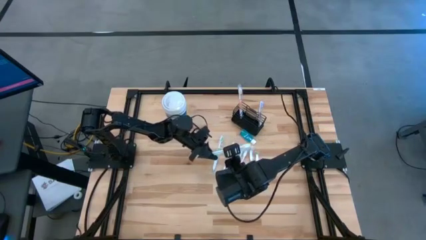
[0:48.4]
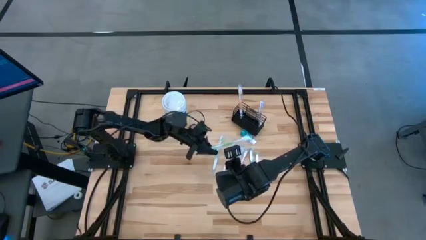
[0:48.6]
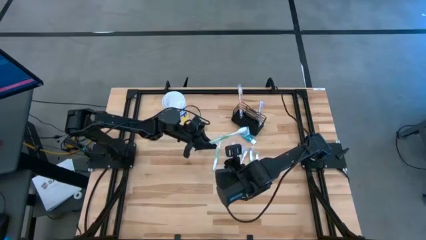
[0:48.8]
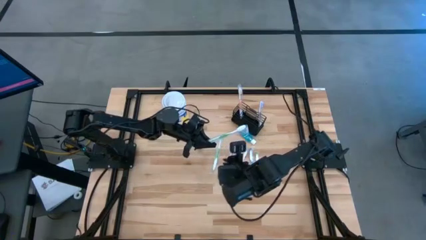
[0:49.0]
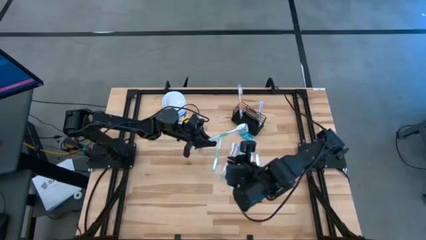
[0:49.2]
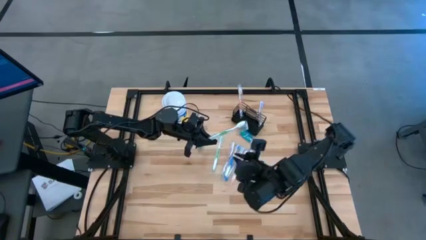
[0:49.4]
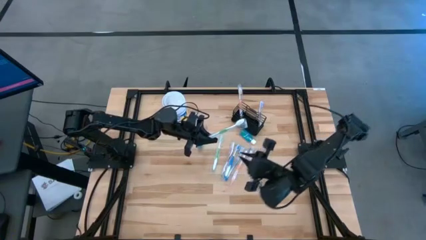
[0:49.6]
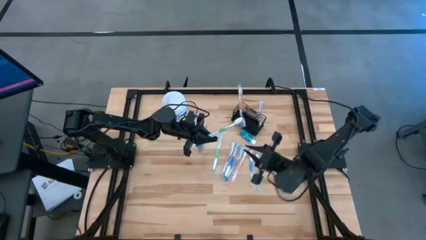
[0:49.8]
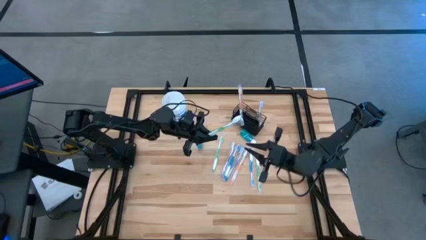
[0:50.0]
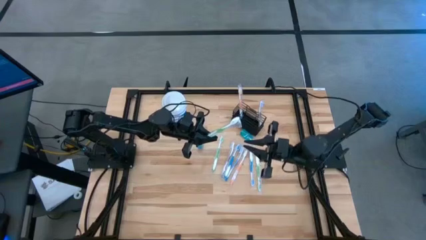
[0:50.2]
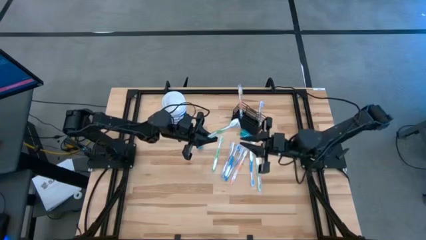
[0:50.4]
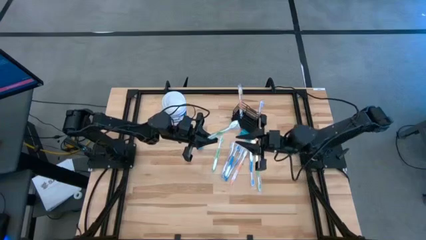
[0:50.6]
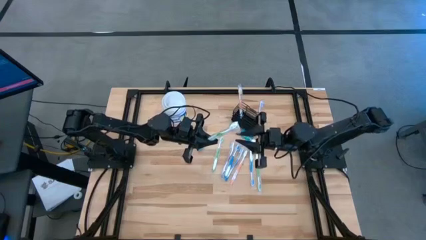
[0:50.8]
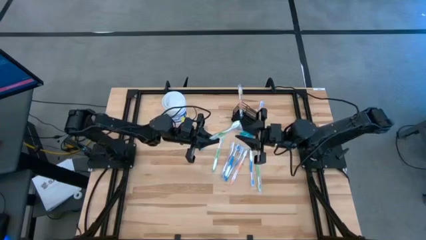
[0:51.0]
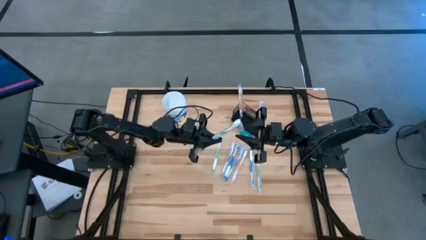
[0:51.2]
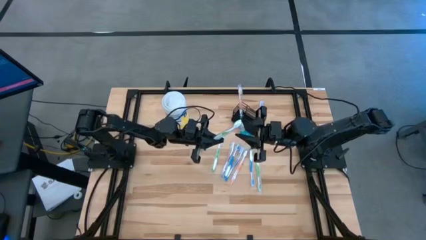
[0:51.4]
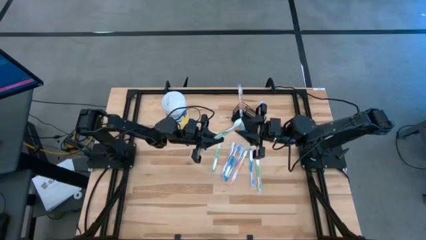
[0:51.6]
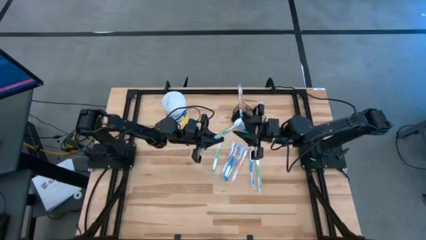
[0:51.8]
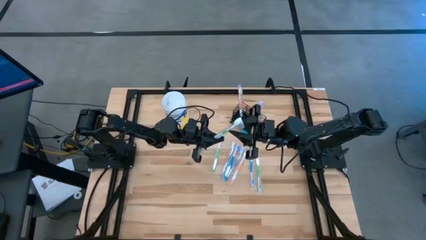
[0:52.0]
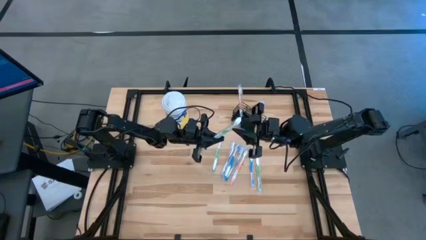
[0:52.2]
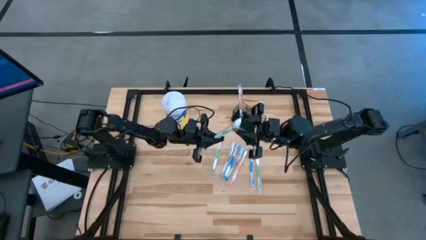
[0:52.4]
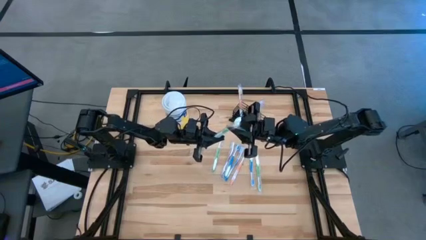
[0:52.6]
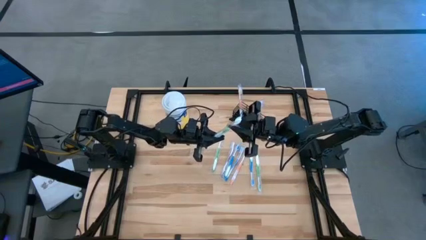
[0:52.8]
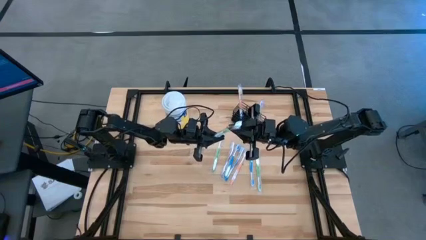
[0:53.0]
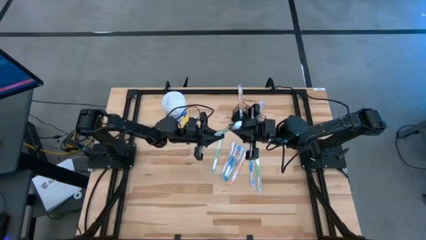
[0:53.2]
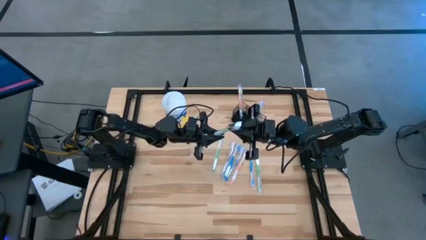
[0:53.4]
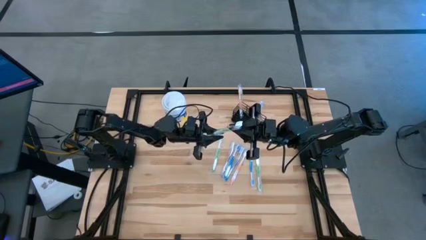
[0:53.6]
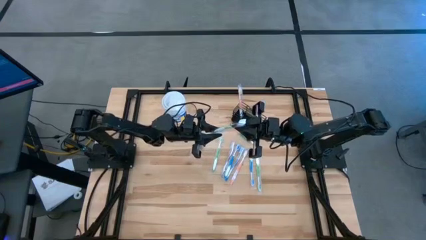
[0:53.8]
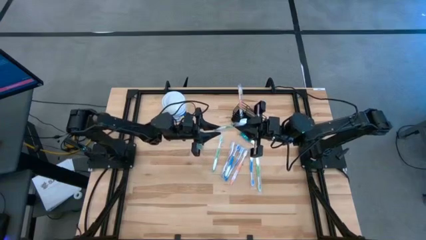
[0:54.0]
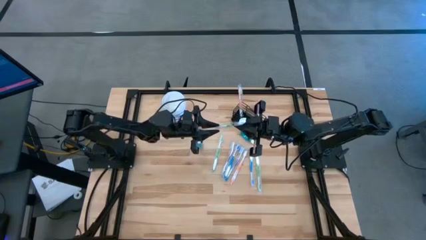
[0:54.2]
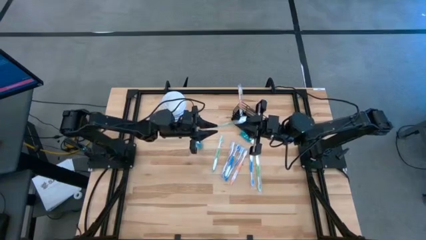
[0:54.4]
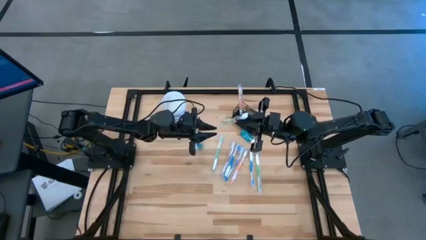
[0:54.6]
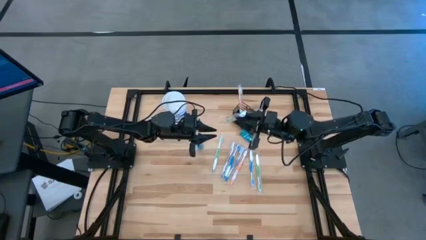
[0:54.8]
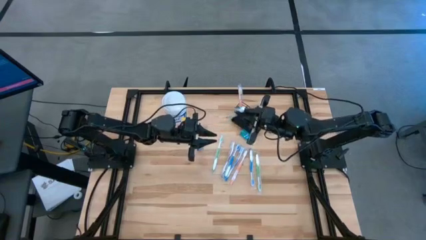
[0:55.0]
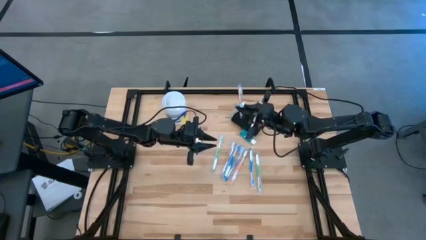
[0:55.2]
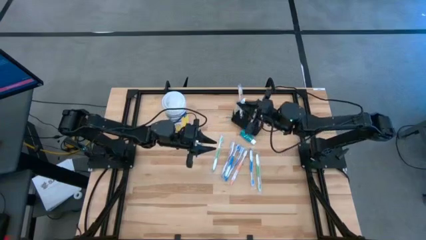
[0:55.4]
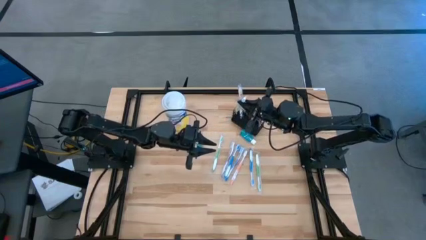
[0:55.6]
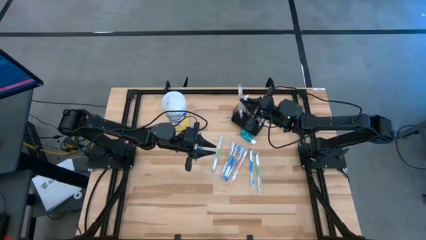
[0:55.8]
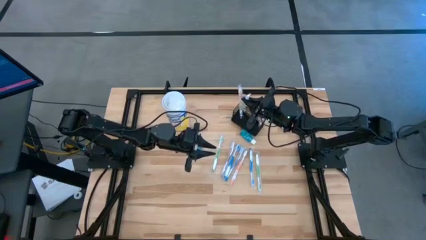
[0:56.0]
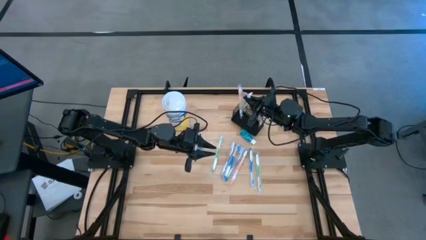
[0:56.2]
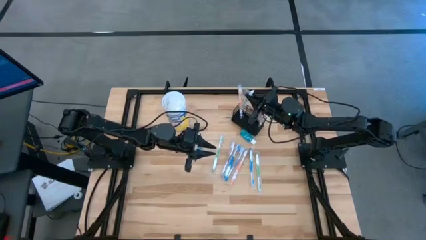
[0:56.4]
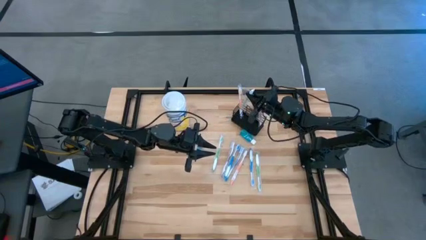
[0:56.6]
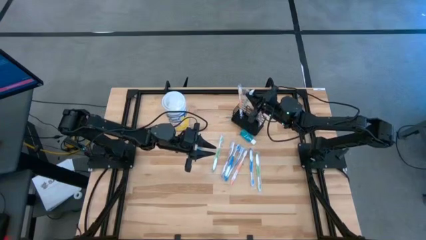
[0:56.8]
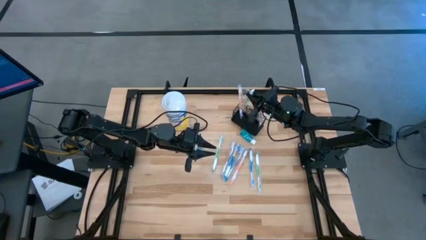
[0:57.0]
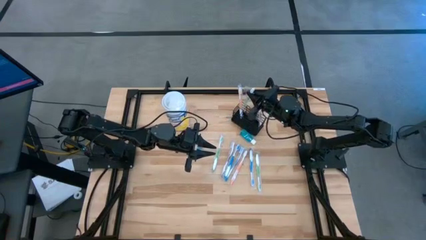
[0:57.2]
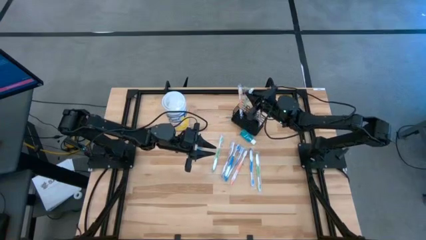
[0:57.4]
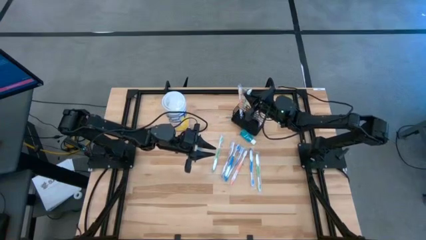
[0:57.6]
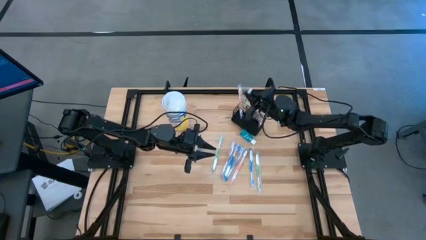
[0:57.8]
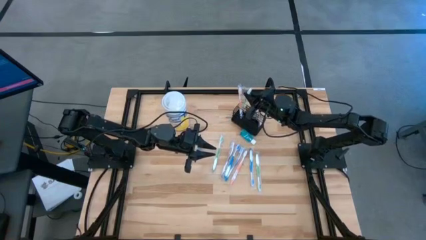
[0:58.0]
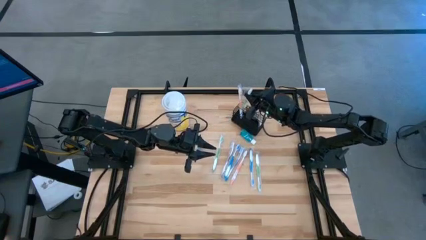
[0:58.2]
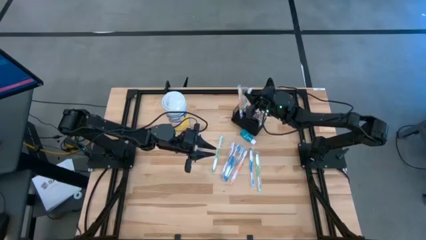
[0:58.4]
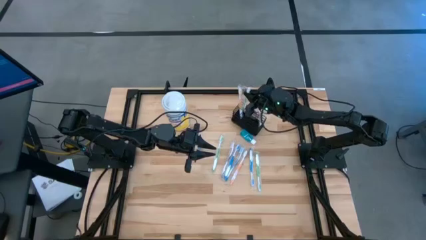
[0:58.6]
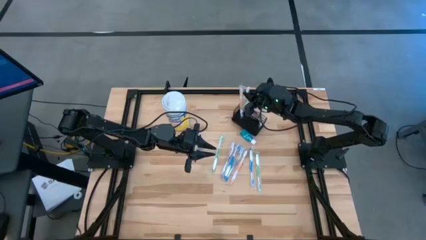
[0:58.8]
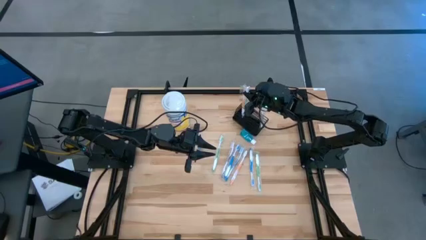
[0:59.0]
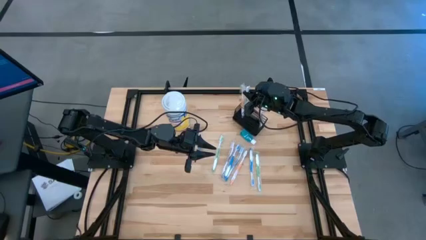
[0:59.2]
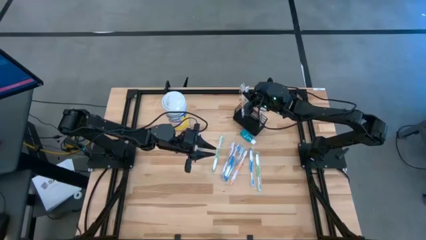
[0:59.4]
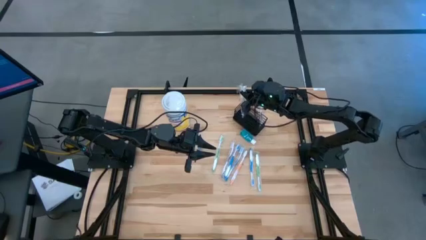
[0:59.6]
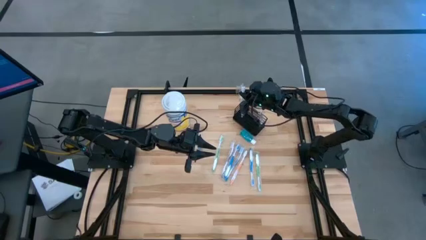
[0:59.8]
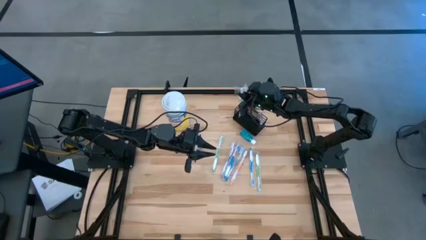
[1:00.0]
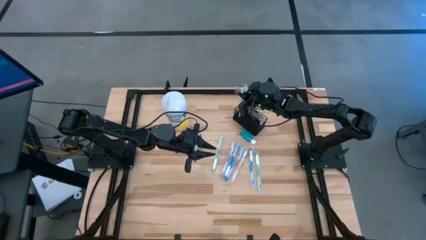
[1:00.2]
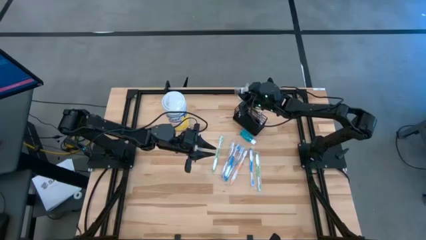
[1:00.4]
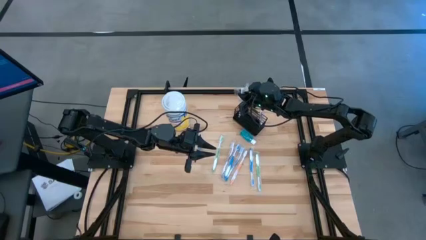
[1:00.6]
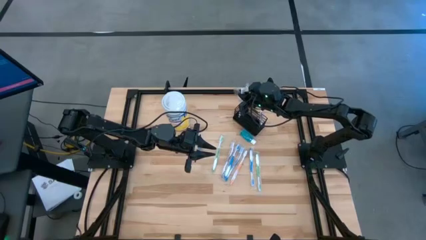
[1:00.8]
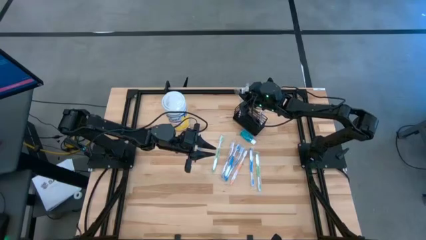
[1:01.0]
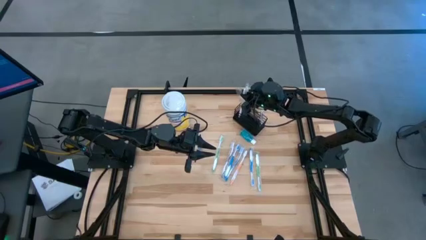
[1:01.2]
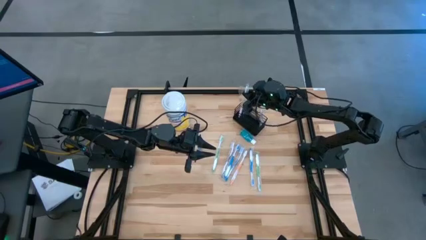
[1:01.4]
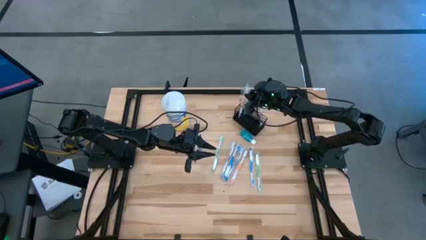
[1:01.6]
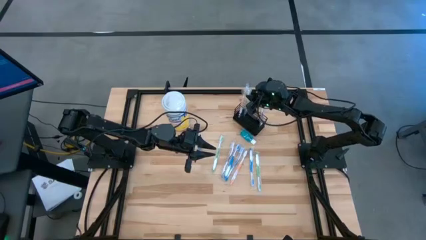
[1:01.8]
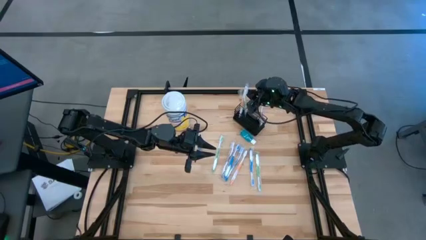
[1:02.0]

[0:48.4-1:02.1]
Task: Pick & Place toothbrushing station
Put the right green toothbrush into the black wire organizer
